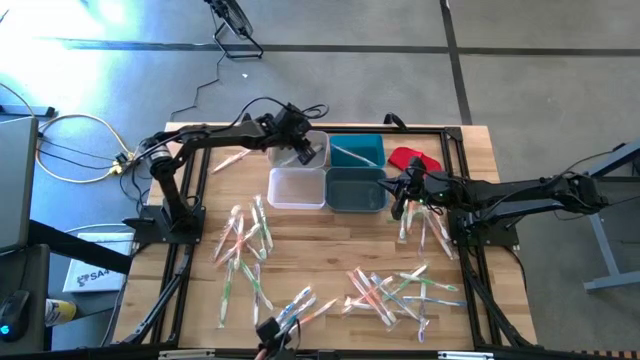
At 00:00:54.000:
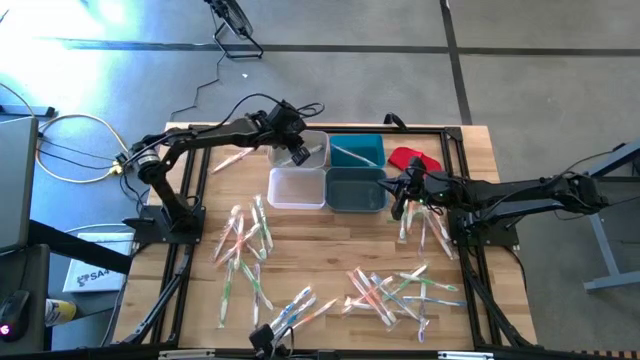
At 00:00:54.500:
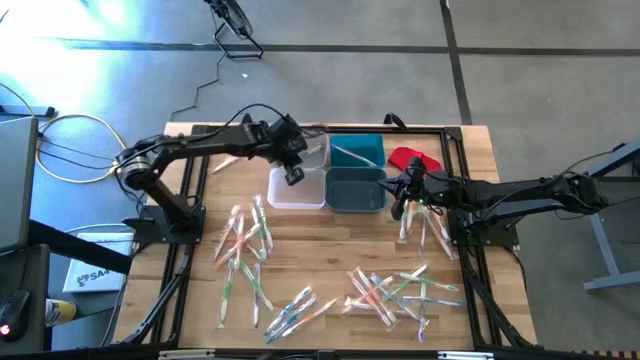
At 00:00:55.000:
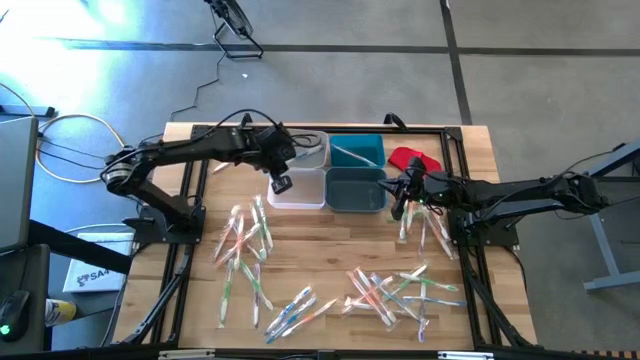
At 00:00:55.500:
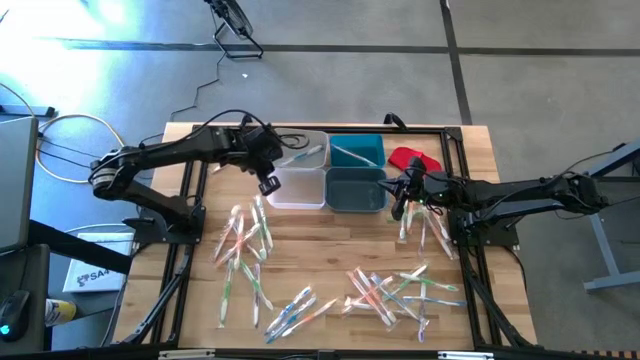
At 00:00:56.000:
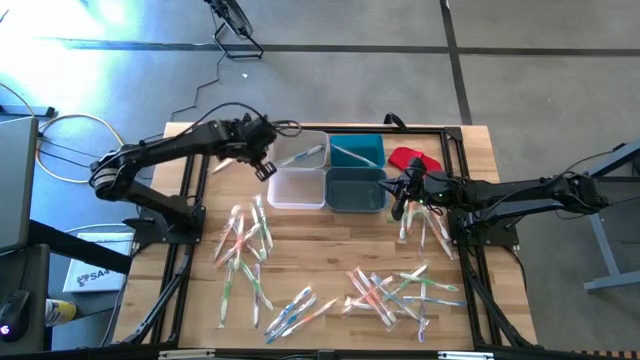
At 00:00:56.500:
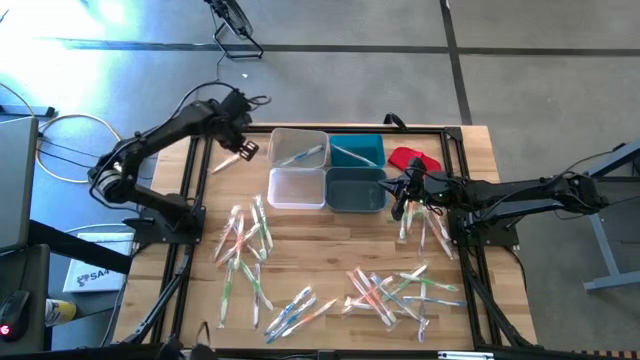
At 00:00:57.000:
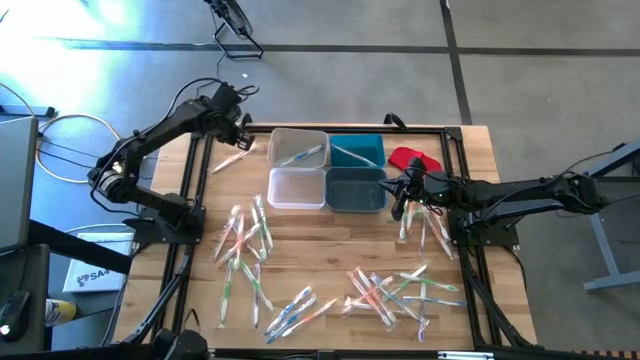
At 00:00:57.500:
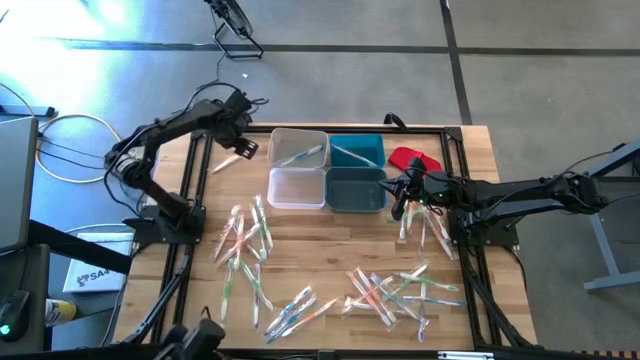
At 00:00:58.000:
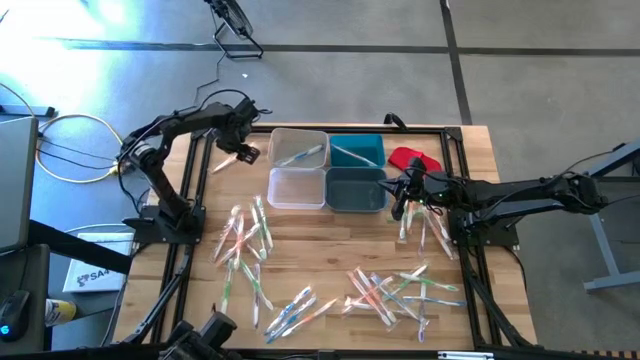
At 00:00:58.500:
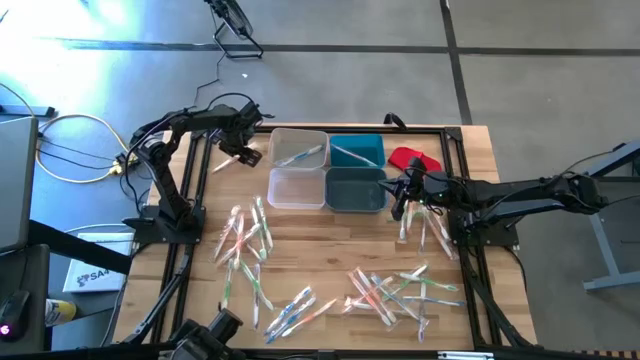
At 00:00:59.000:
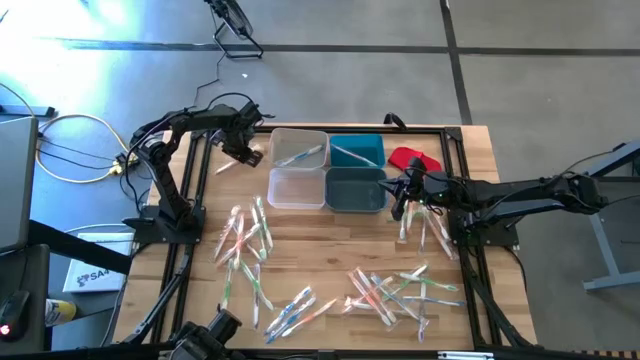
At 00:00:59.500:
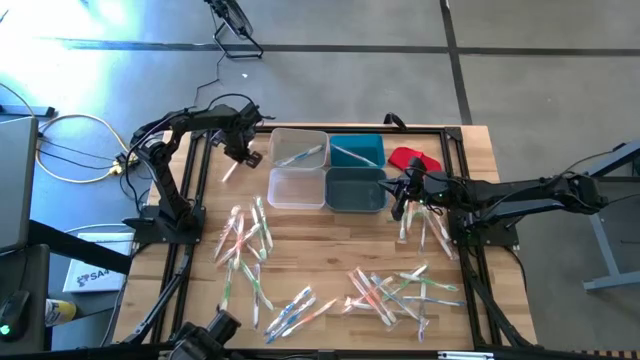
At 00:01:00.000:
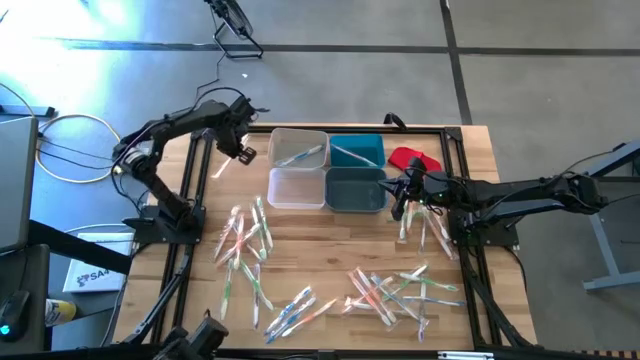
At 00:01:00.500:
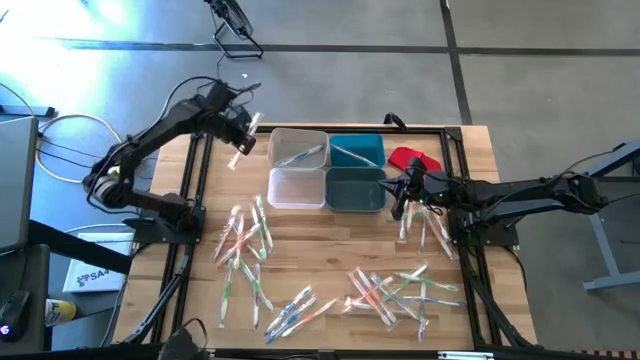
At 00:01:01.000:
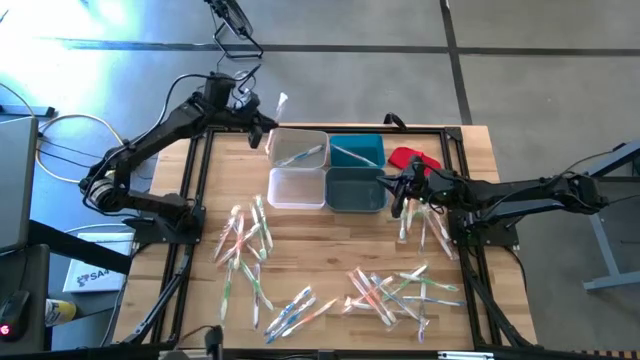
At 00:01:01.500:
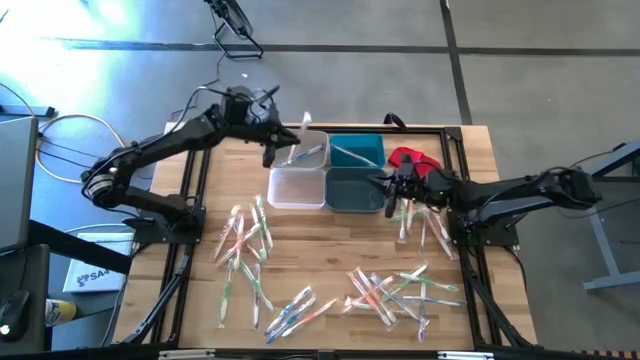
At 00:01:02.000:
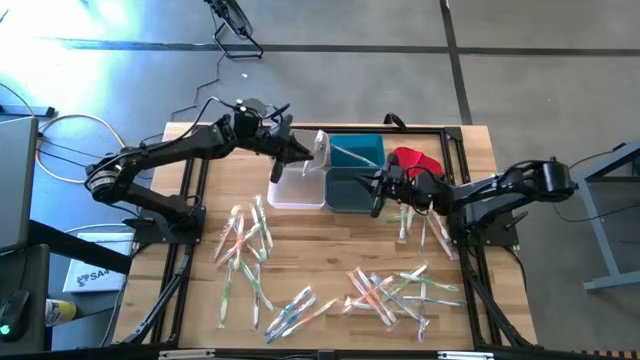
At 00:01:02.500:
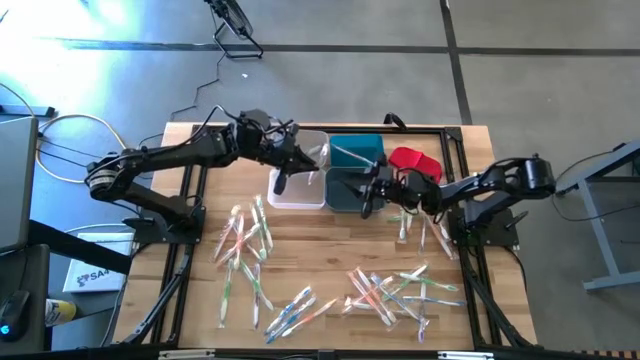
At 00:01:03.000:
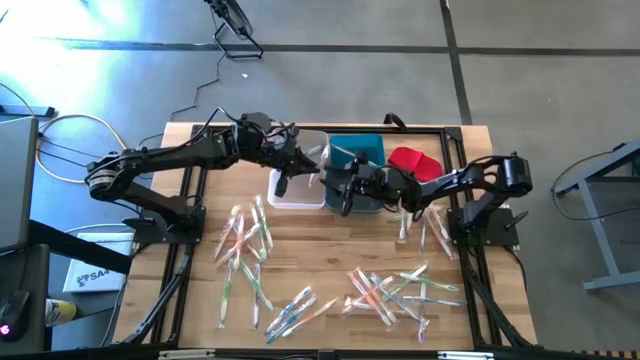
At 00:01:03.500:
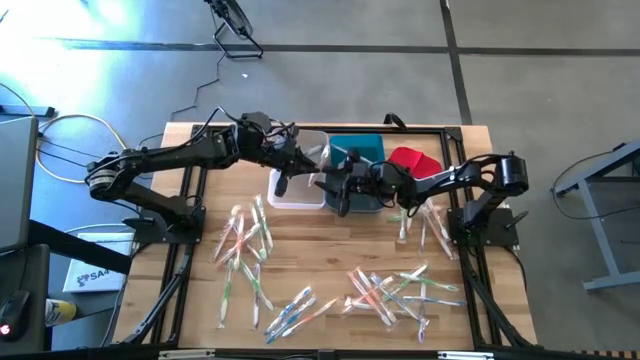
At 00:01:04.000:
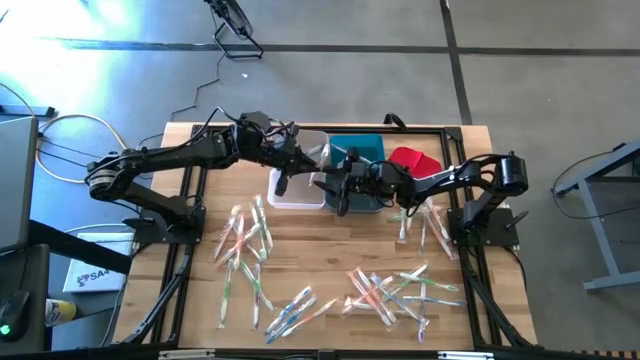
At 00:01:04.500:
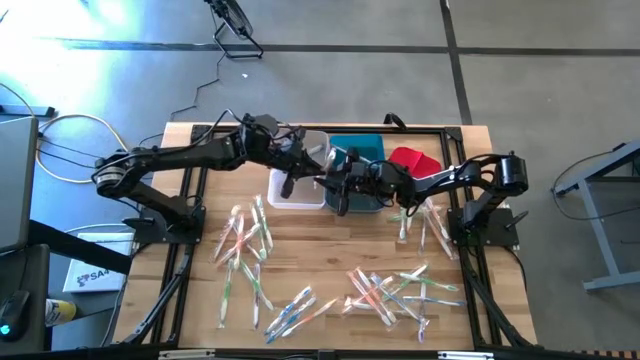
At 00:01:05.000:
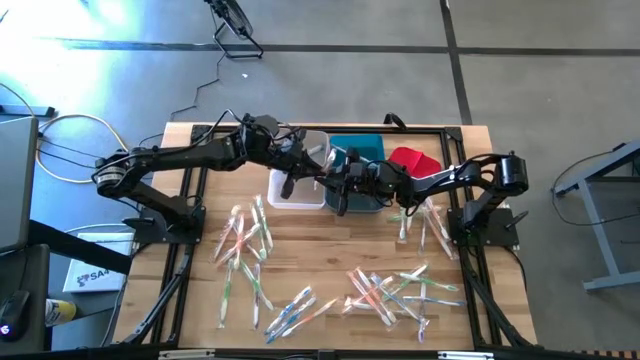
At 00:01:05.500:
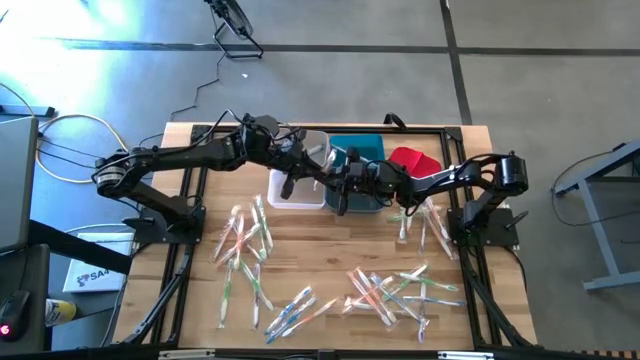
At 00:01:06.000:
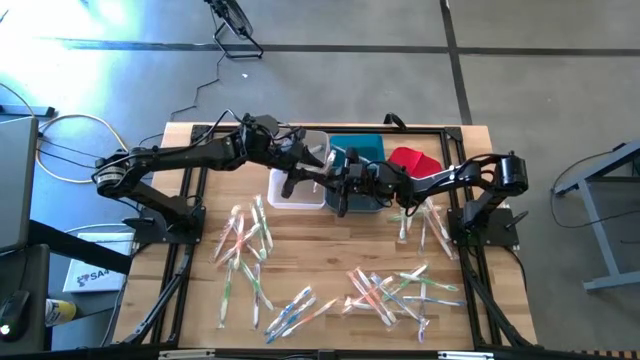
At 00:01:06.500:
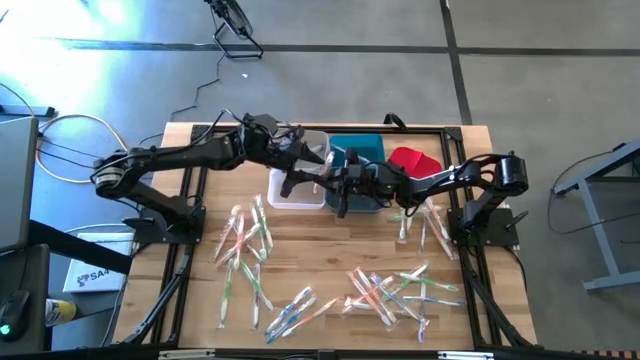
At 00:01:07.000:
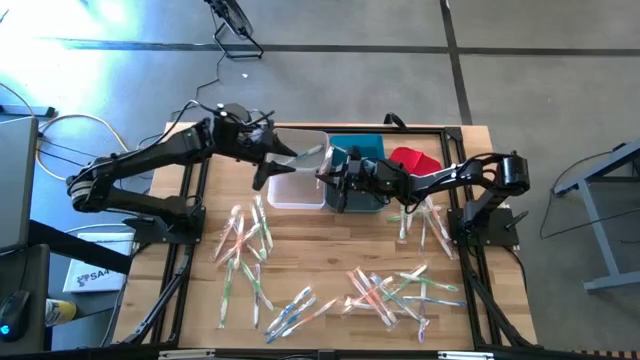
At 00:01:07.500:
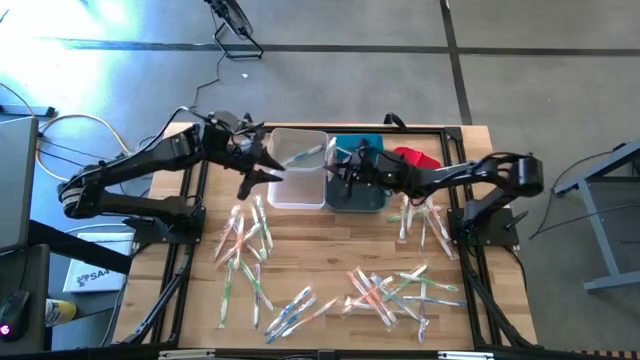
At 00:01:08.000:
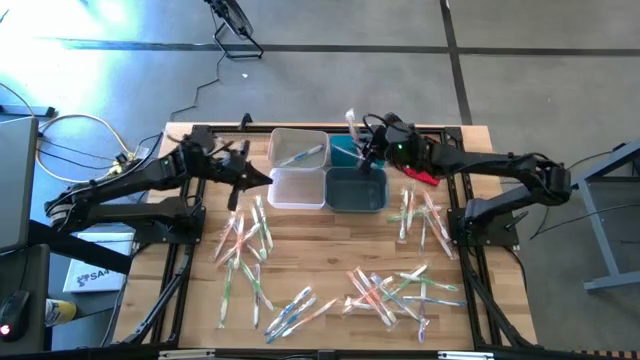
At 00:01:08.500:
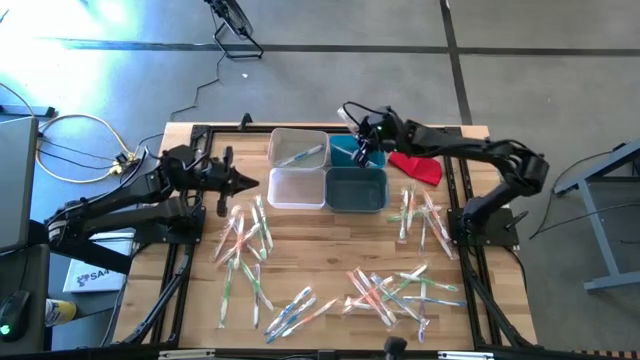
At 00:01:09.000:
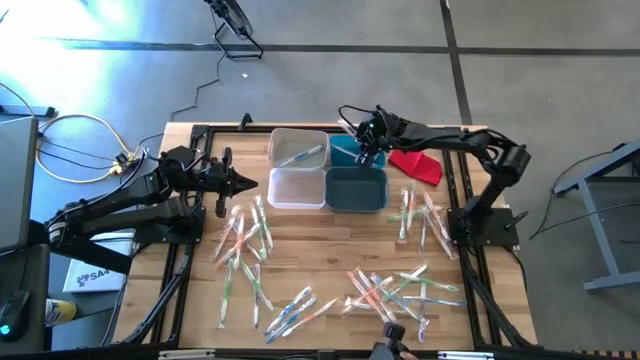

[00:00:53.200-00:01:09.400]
Task: Pick & Place Toothbrushes
Put the orange toothbrush into the blue bin

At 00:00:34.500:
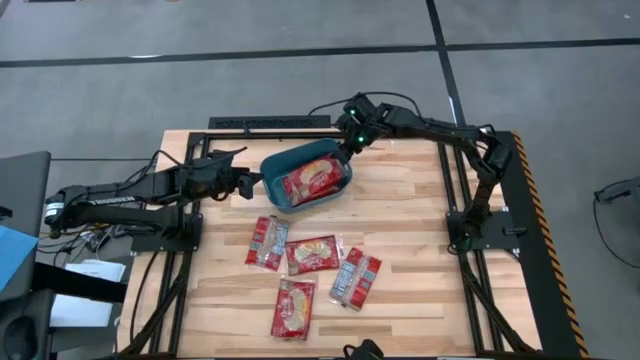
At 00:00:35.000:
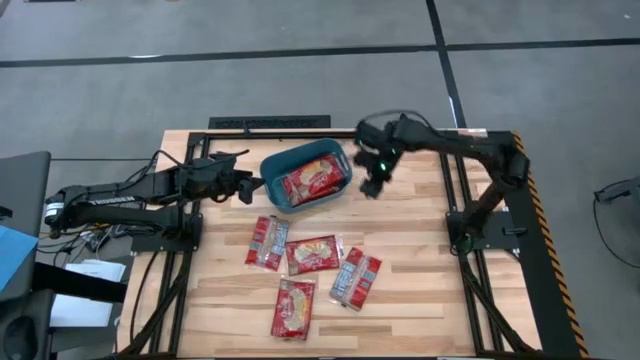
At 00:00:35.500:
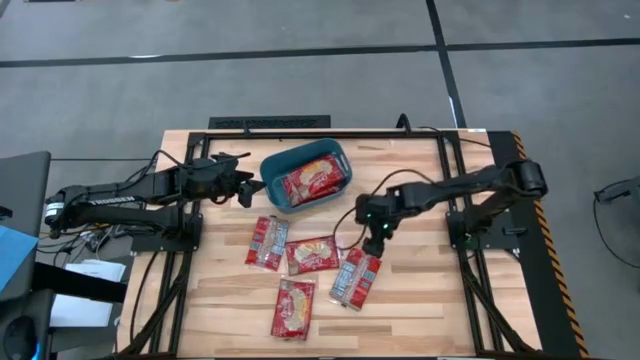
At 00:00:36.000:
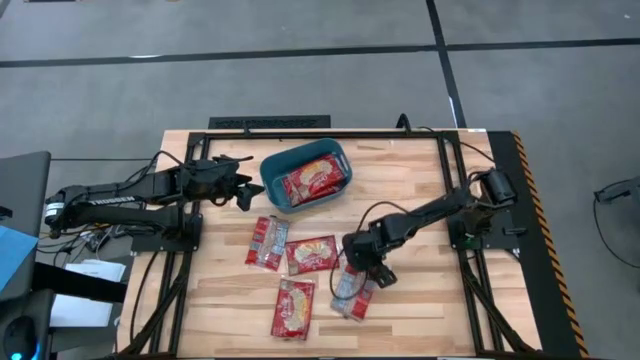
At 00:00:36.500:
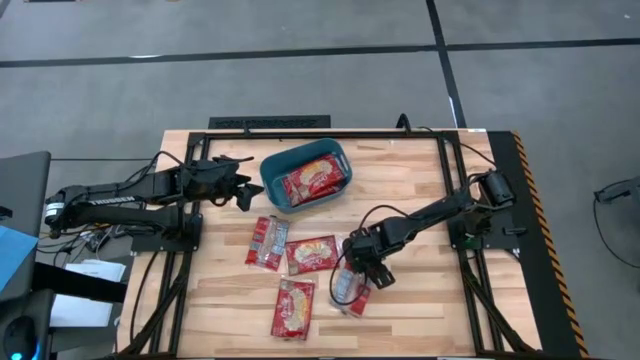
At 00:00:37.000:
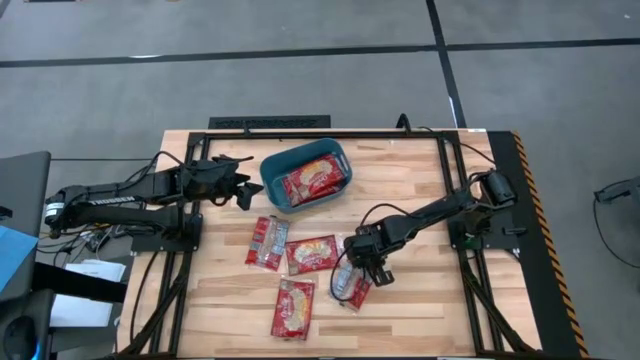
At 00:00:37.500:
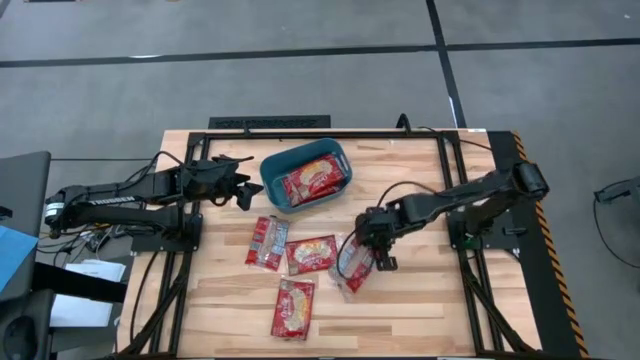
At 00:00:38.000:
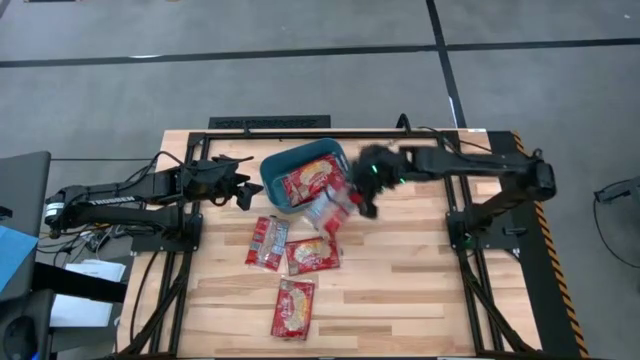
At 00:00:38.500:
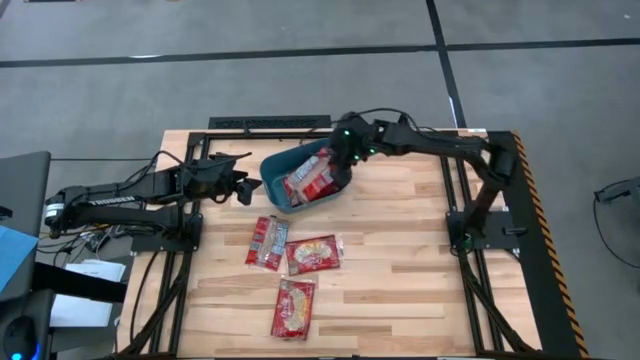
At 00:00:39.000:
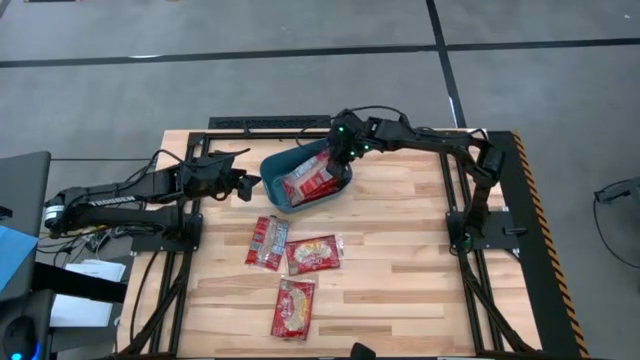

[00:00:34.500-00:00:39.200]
Task: Sort popcorn bags into baskets
Put the red popcorn bag into the blue bin

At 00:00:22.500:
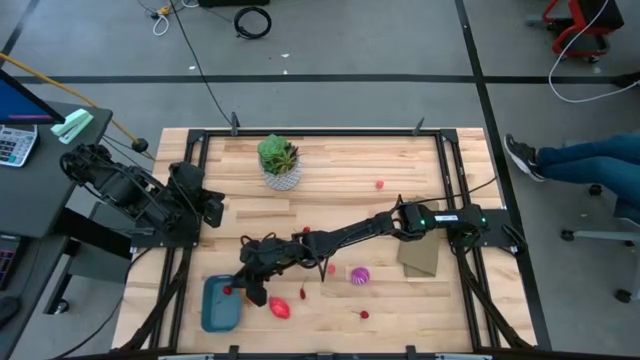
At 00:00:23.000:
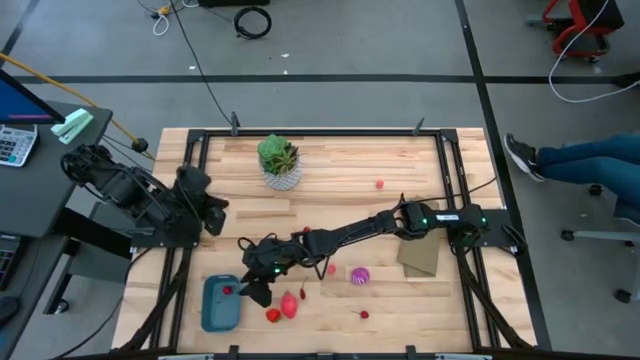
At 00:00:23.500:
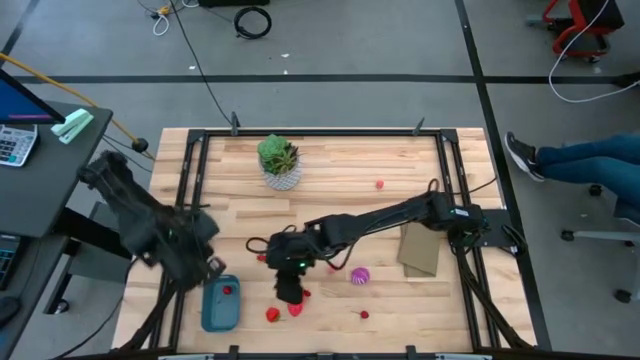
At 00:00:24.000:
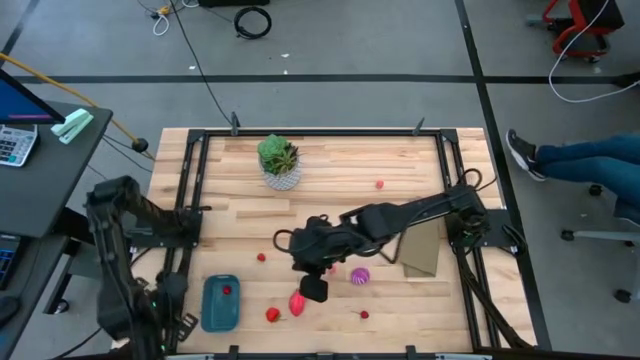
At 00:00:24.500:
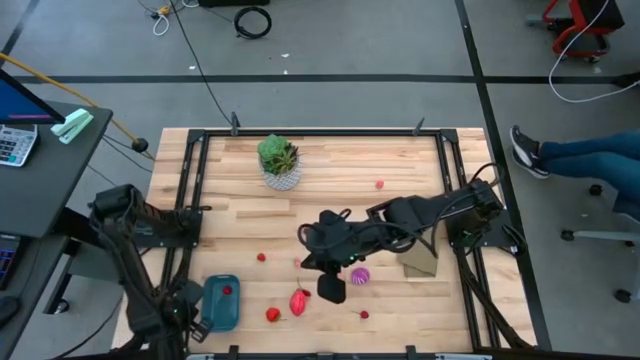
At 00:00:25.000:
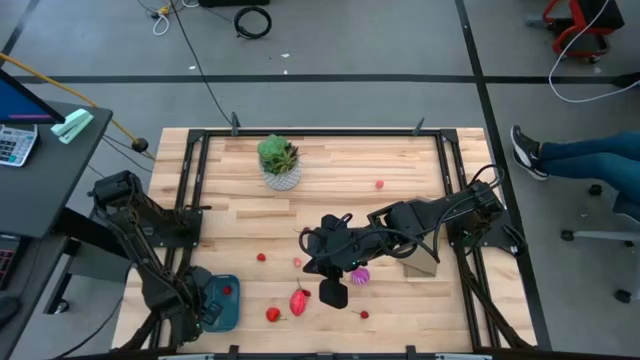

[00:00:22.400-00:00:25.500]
Task: Pick and placing Produce into tupperware
Adjust the bin
